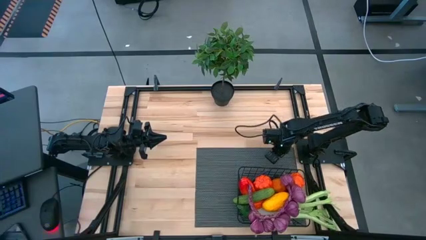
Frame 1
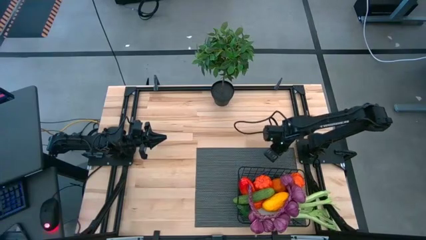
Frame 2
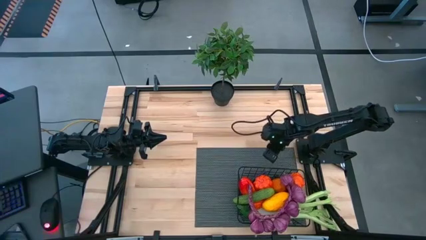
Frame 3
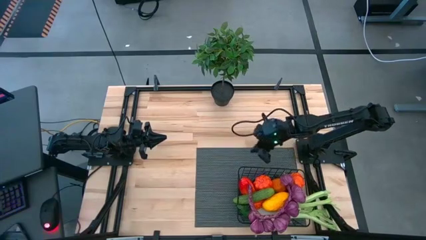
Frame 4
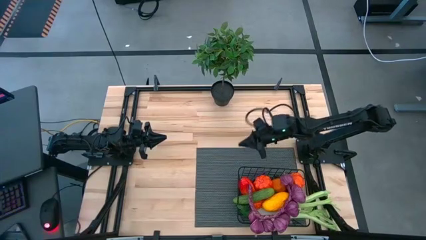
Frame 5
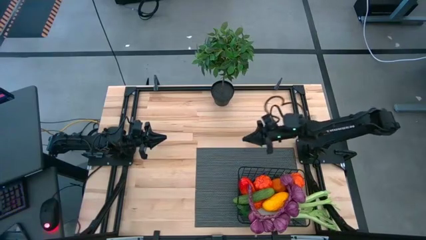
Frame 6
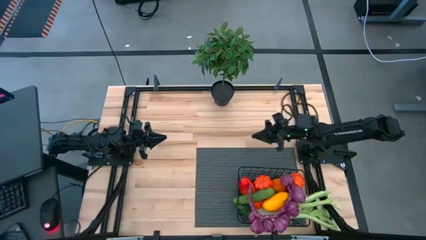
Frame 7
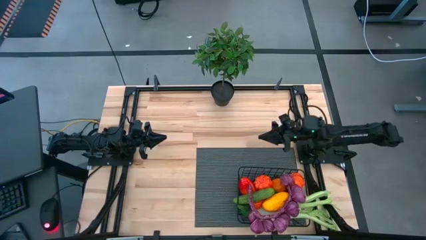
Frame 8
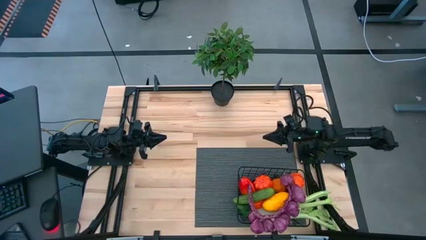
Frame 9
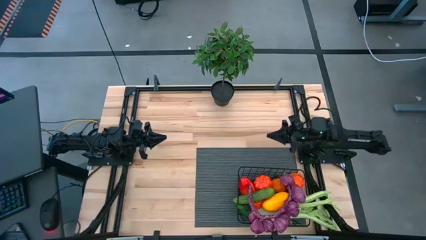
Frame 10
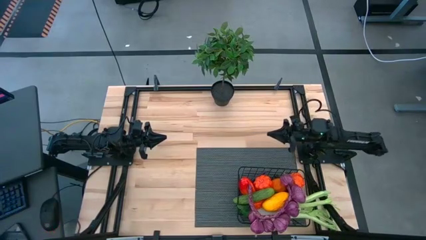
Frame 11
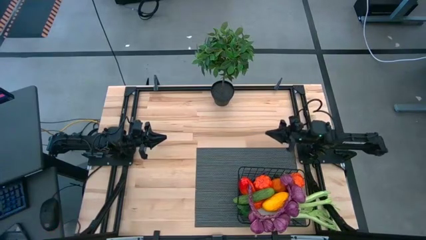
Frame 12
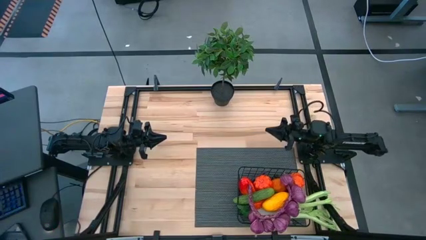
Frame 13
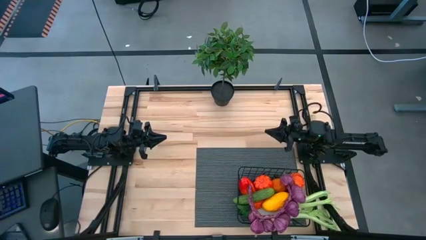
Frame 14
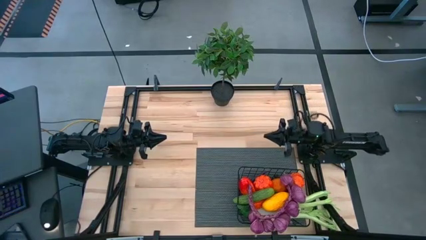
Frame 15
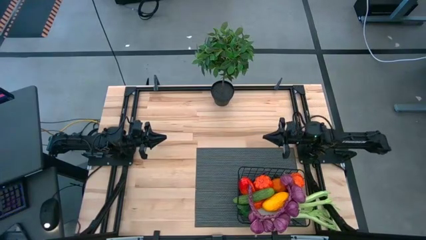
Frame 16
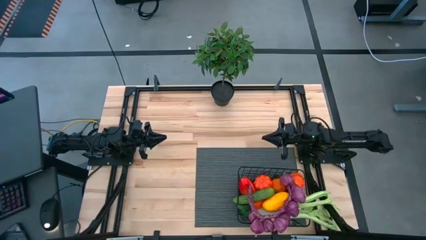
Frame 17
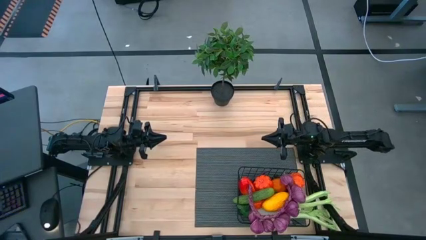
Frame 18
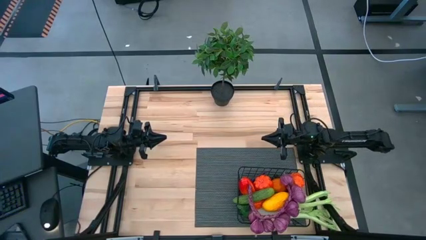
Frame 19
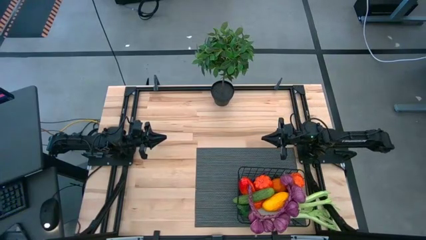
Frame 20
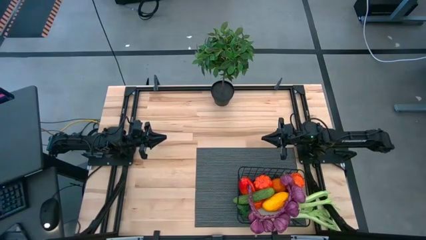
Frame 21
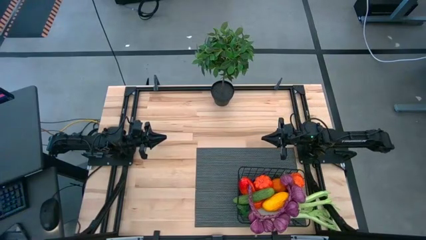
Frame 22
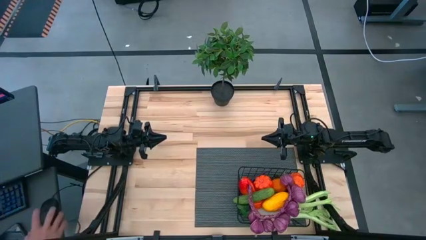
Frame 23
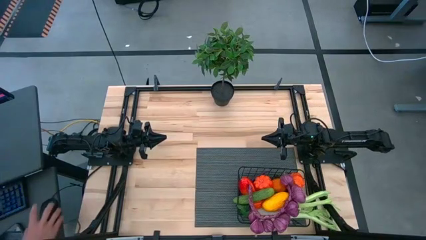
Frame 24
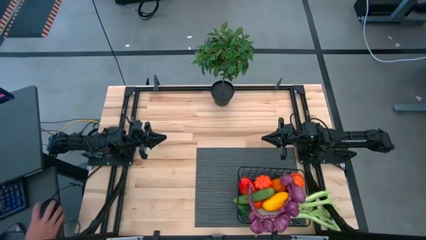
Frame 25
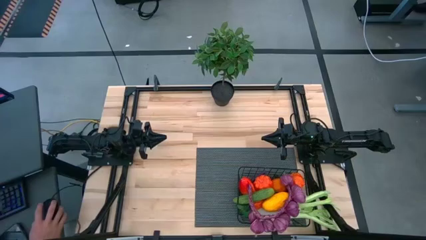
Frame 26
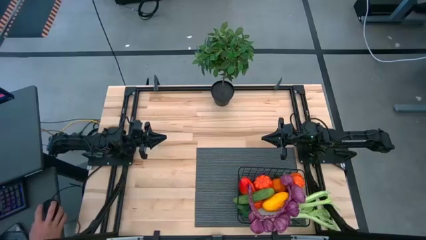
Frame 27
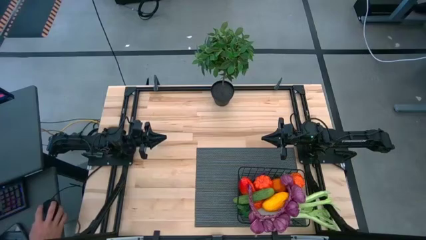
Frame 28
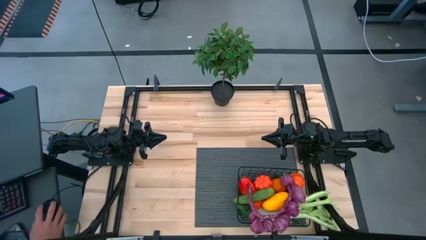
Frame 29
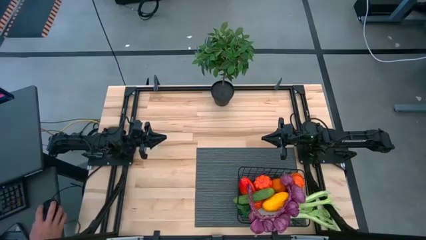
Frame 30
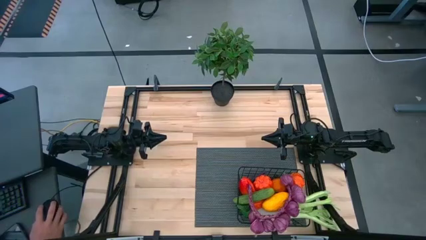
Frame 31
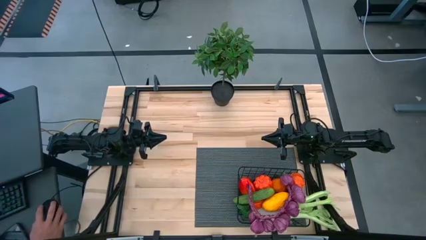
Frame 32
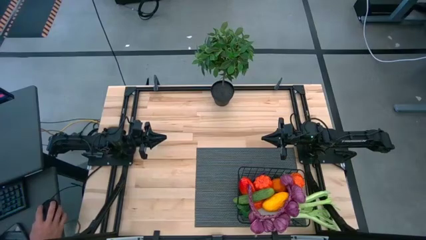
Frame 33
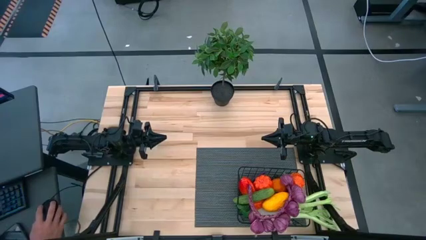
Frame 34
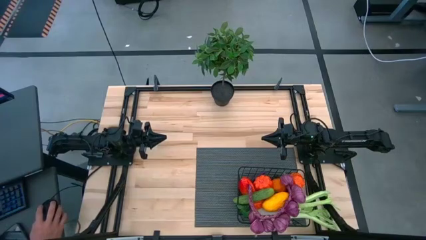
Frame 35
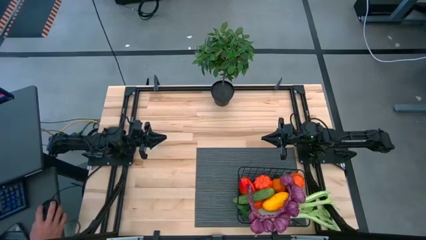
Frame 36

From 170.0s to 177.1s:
Task: Build produce basket
Return to Home Position

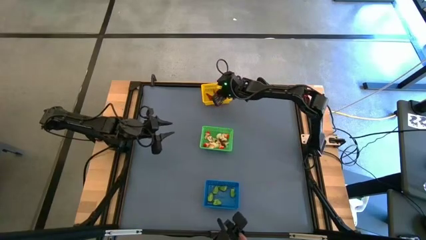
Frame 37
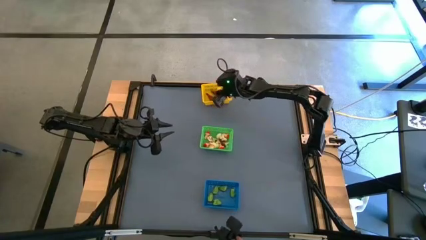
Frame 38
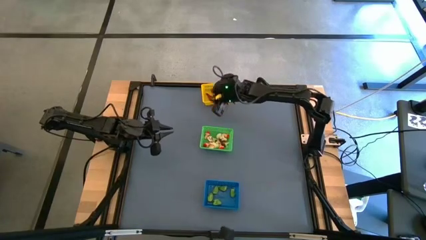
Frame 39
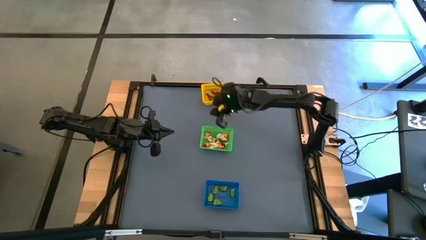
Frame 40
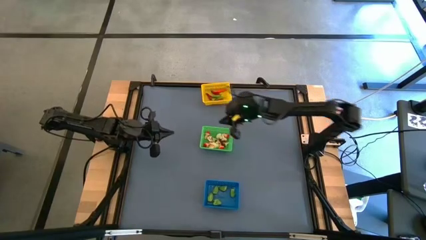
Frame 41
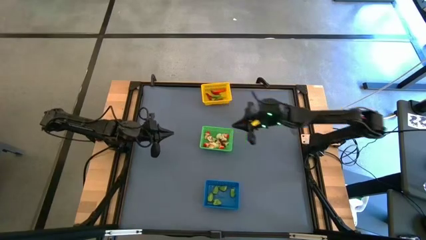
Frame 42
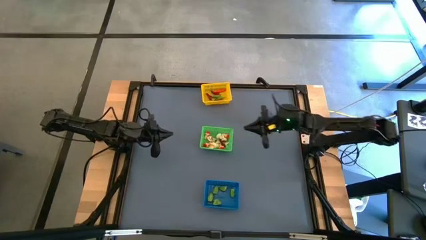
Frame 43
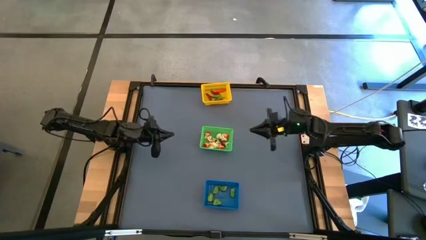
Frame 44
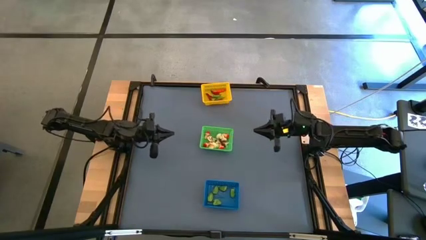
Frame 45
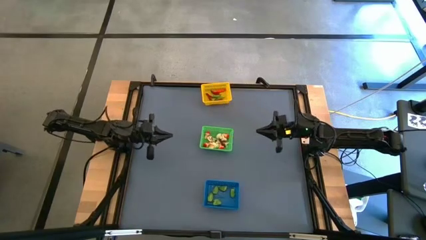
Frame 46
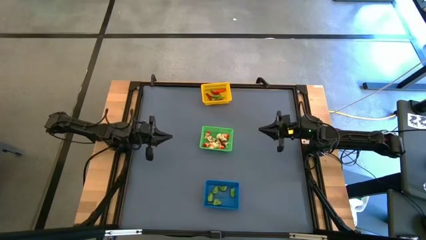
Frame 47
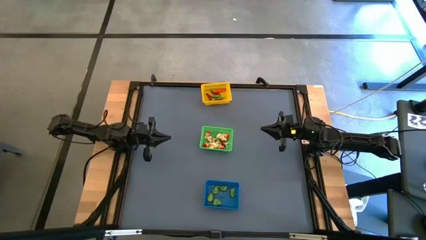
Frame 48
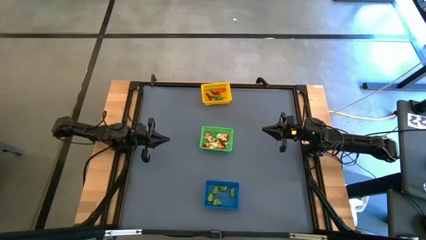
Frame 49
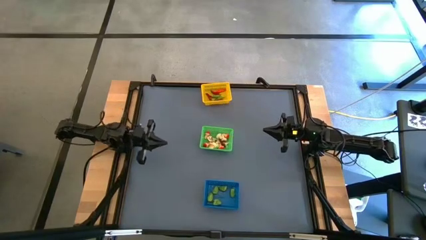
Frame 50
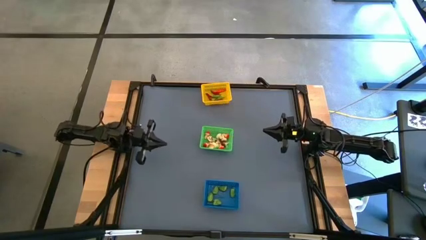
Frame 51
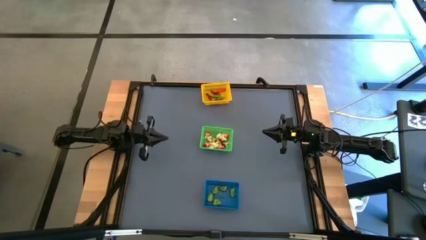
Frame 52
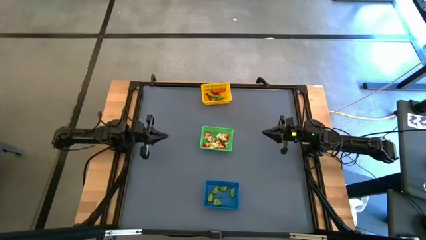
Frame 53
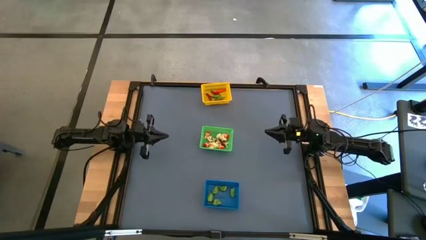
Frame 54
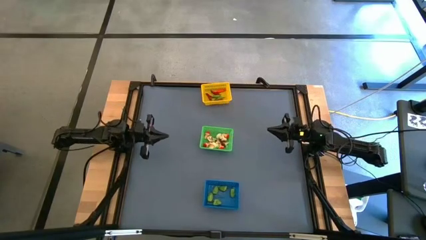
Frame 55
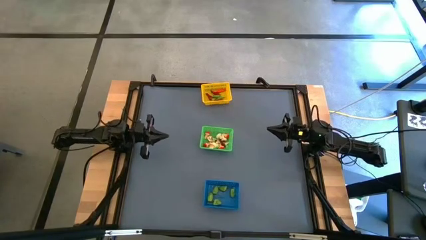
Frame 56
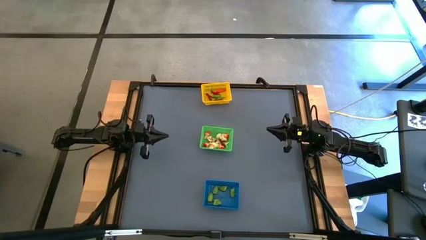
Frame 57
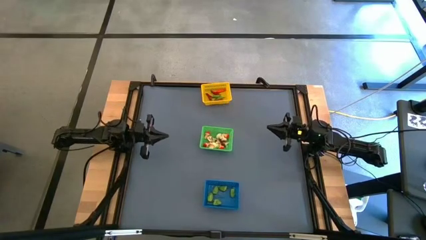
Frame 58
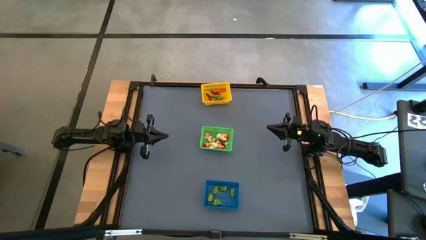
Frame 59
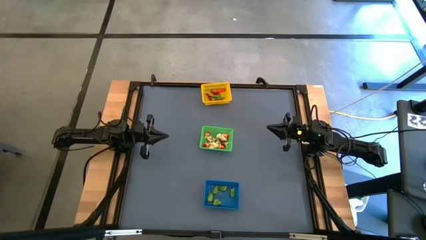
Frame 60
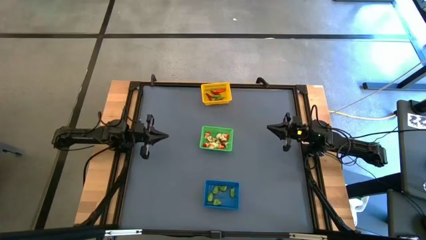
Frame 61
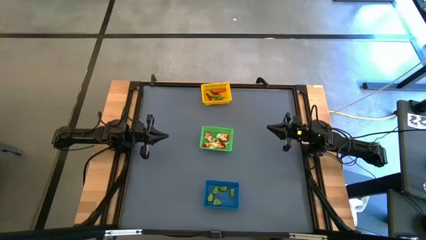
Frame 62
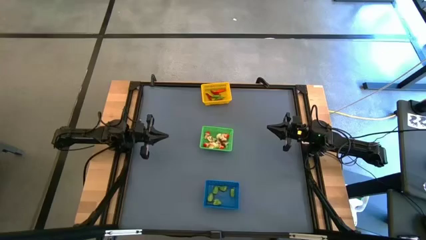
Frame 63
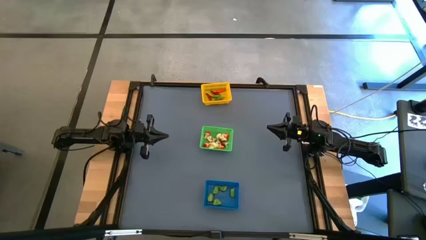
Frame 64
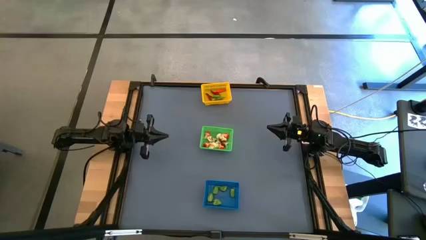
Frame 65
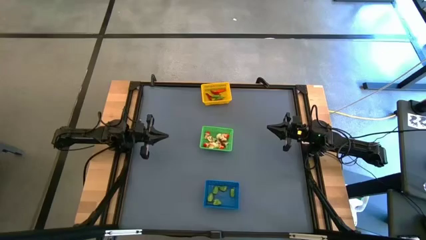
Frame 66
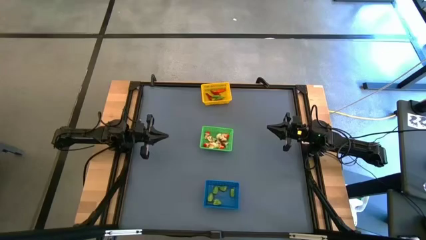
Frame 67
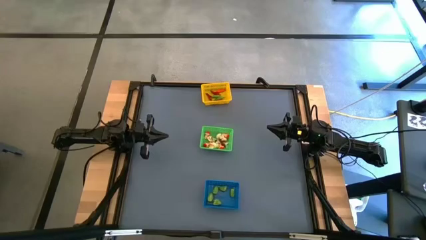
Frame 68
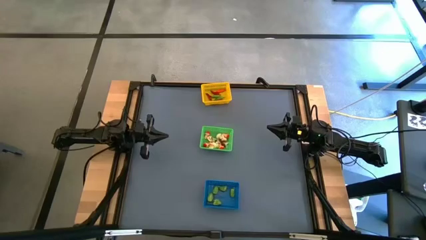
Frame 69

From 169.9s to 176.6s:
Task: Sort produce into baskets
Return to Home Position

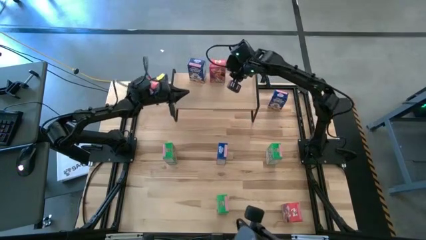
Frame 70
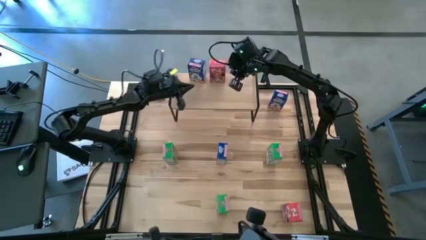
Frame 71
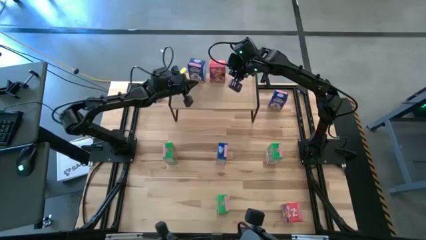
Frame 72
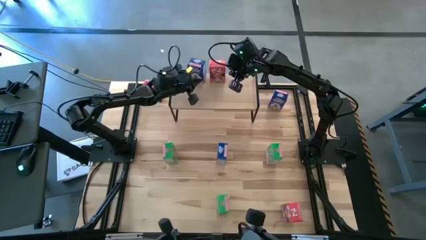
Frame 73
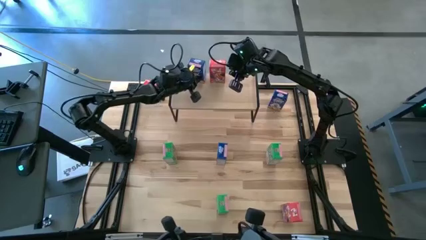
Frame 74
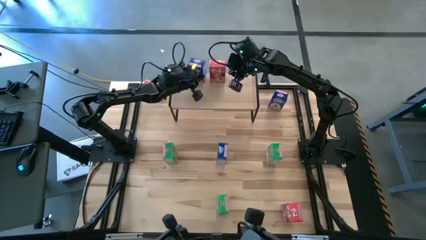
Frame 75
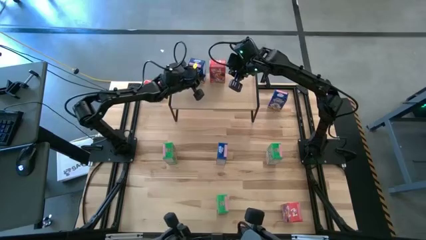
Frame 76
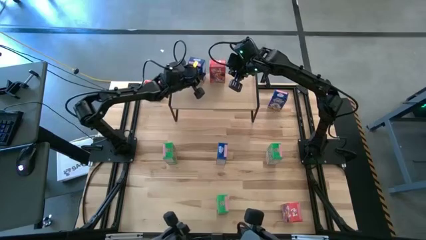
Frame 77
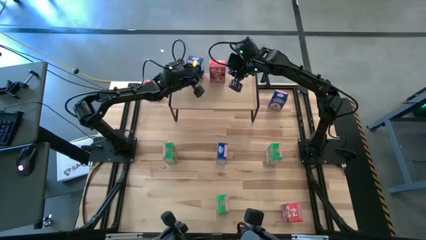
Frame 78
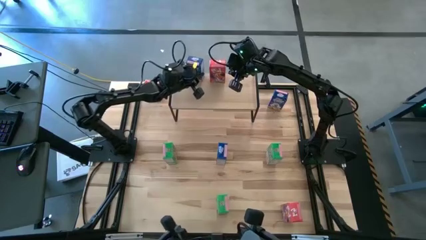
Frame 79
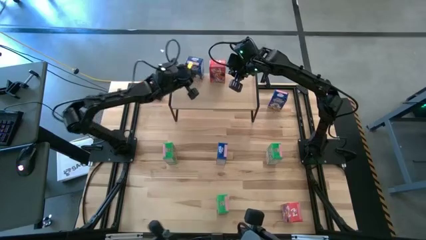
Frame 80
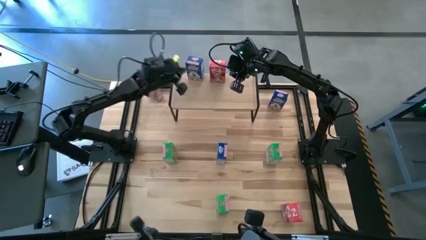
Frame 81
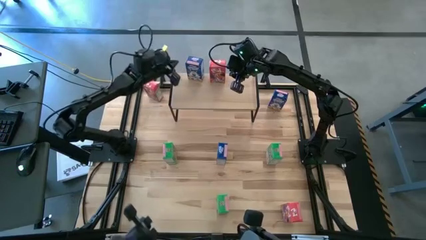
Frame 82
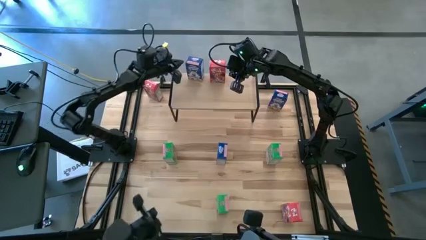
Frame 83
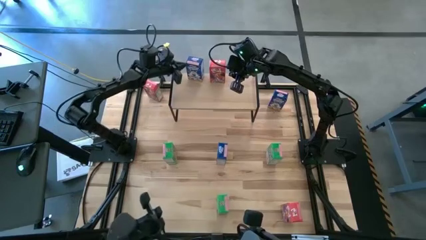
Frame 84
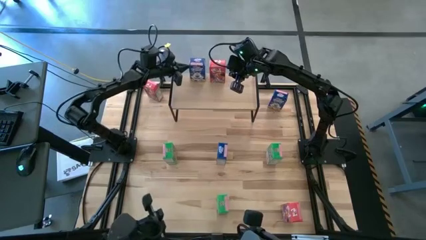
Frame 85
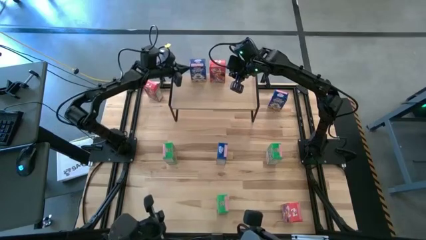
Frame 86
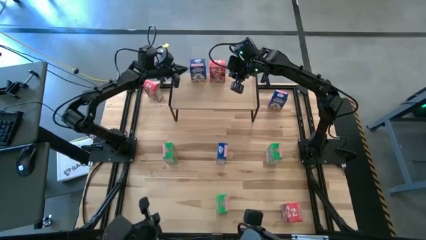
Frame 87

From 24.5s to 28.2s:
Task: Stack cereal on shelf
Adjust the blue cereal box
